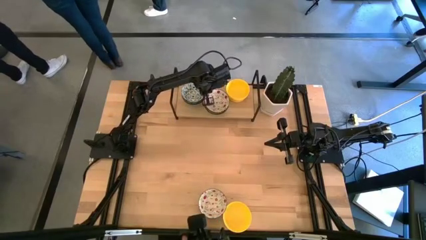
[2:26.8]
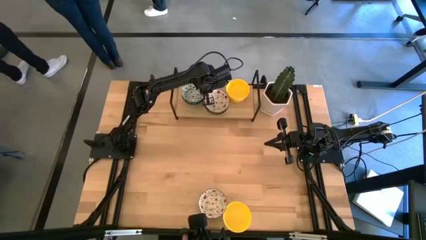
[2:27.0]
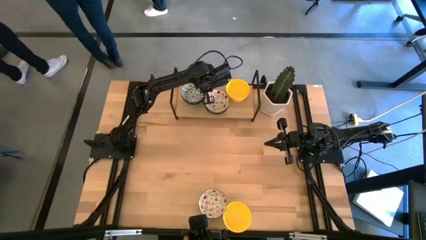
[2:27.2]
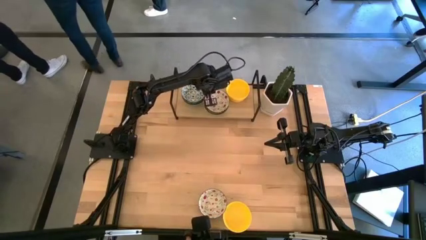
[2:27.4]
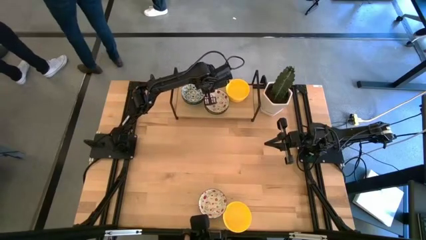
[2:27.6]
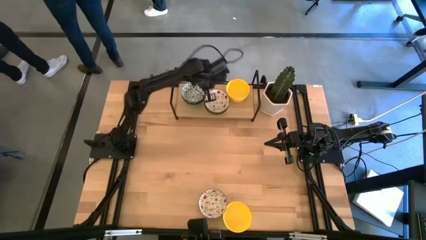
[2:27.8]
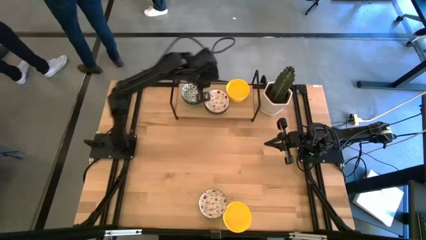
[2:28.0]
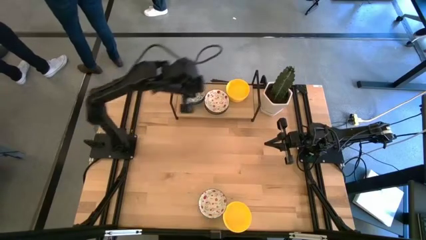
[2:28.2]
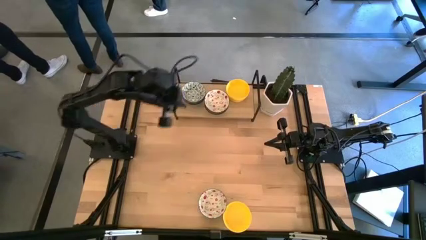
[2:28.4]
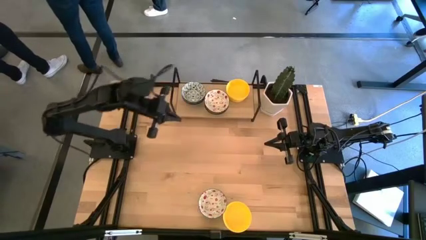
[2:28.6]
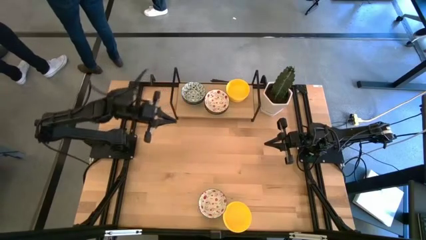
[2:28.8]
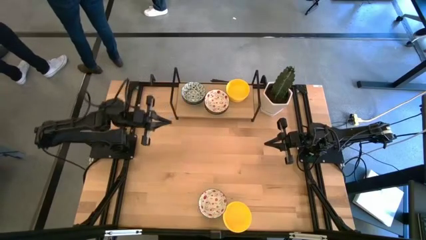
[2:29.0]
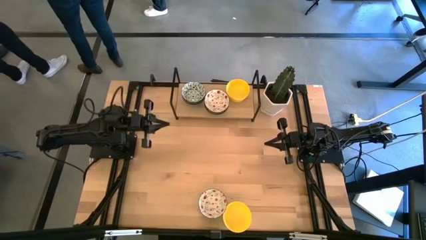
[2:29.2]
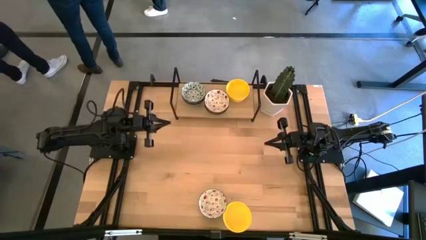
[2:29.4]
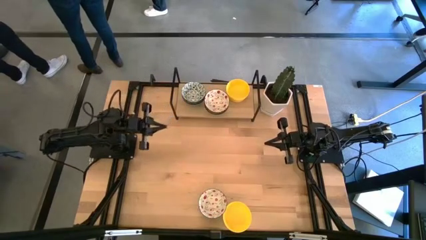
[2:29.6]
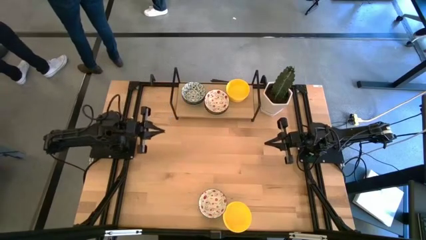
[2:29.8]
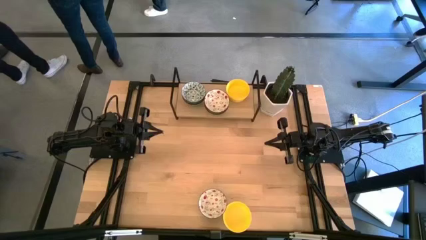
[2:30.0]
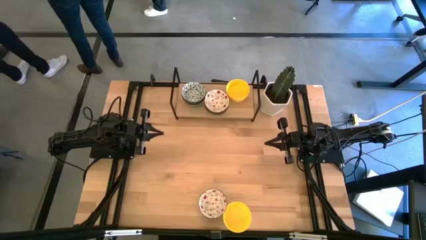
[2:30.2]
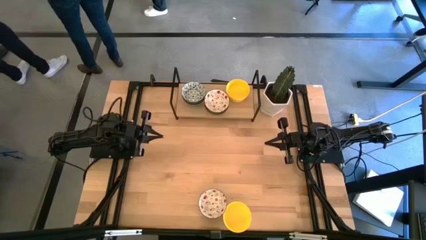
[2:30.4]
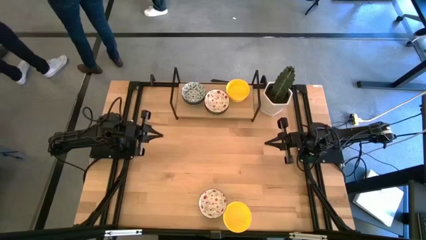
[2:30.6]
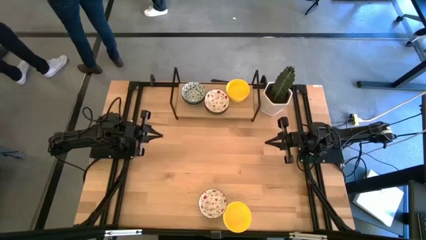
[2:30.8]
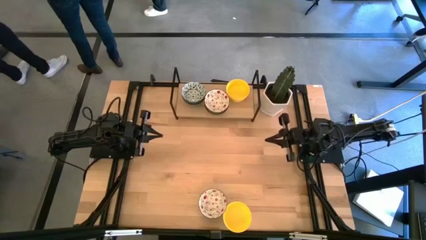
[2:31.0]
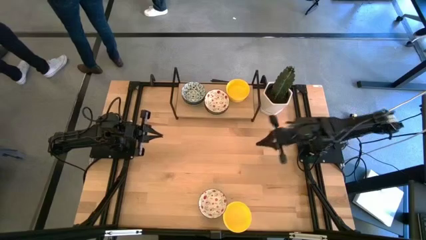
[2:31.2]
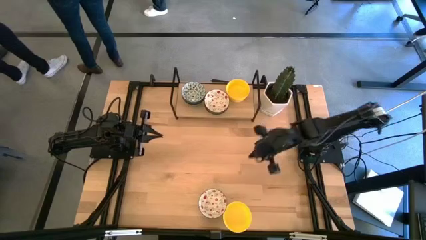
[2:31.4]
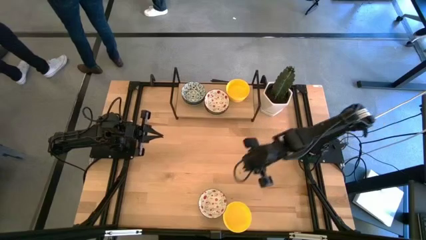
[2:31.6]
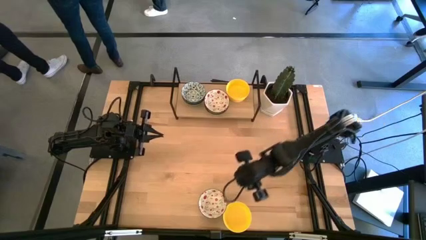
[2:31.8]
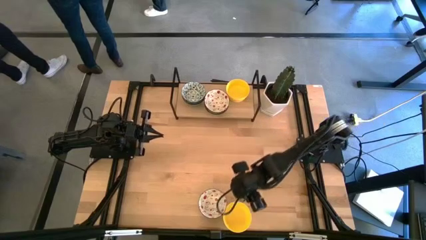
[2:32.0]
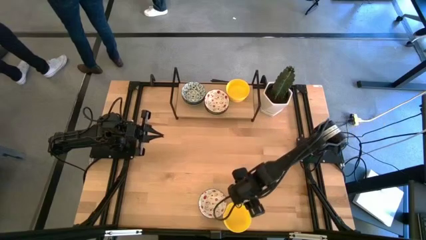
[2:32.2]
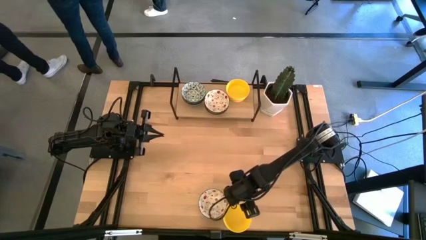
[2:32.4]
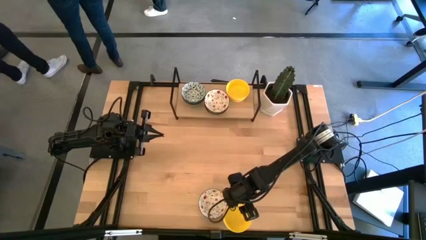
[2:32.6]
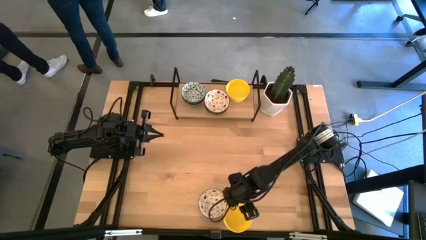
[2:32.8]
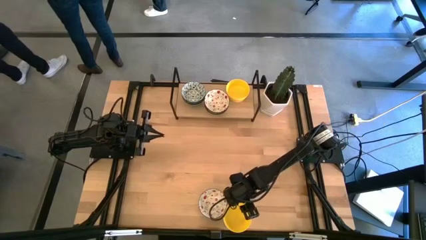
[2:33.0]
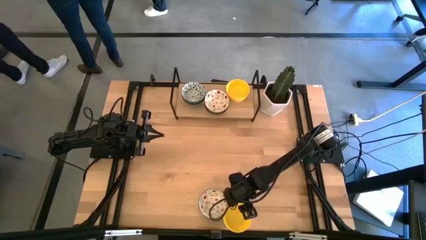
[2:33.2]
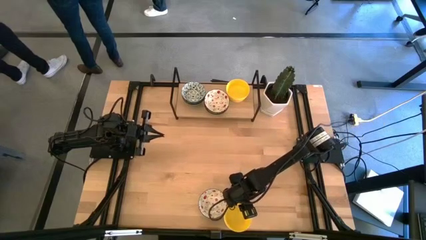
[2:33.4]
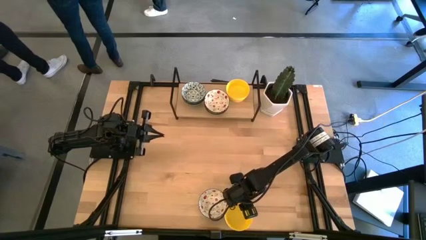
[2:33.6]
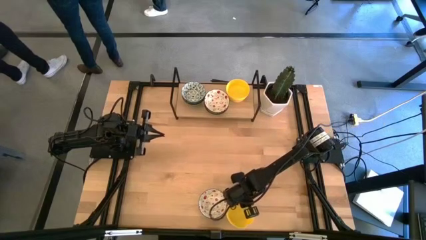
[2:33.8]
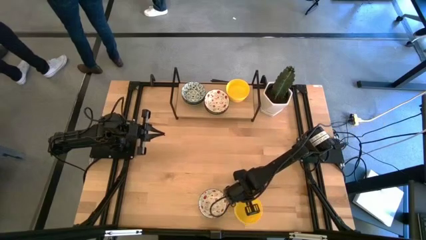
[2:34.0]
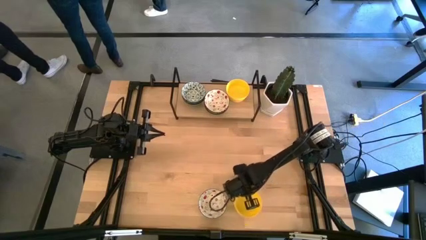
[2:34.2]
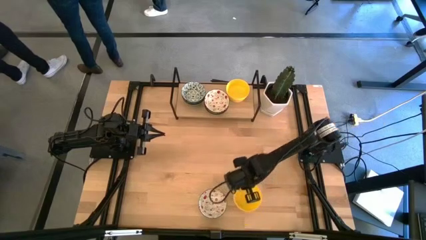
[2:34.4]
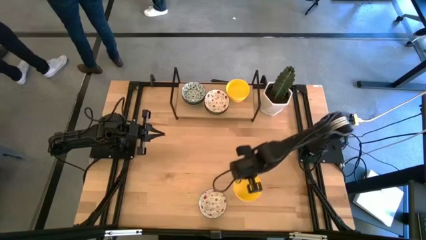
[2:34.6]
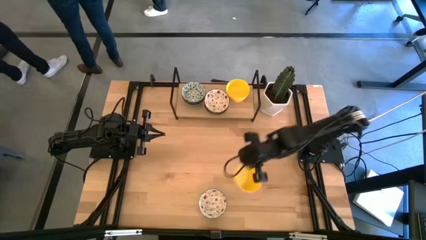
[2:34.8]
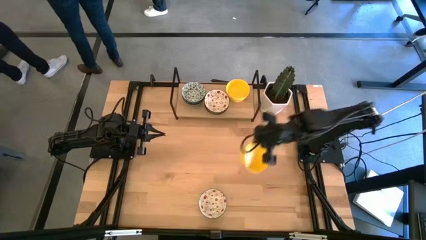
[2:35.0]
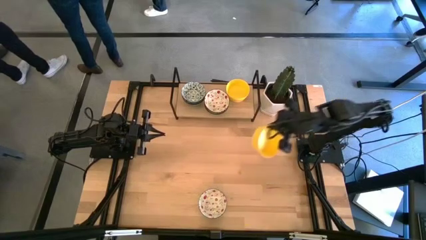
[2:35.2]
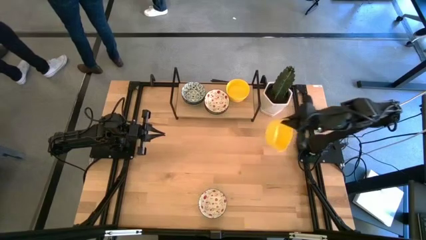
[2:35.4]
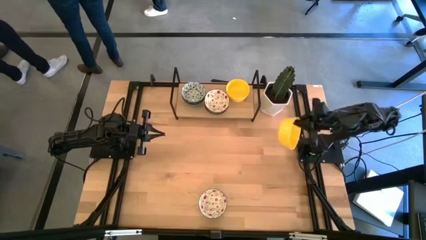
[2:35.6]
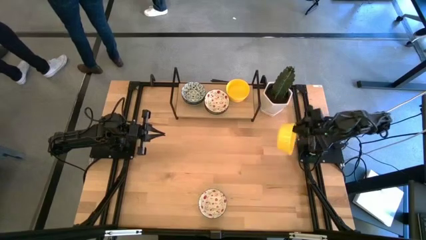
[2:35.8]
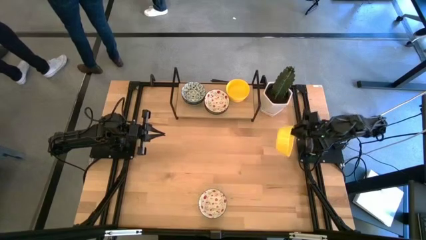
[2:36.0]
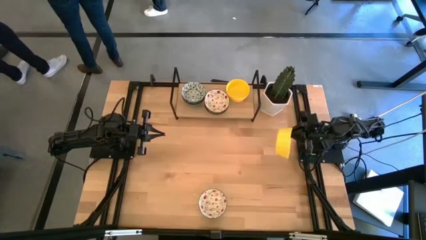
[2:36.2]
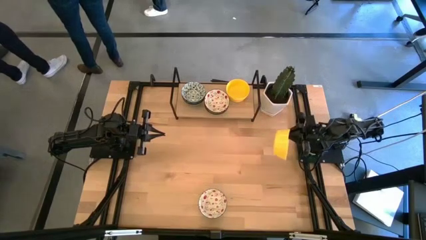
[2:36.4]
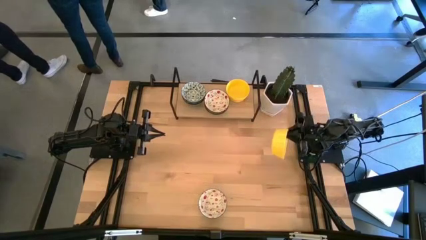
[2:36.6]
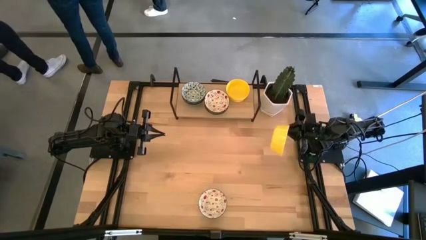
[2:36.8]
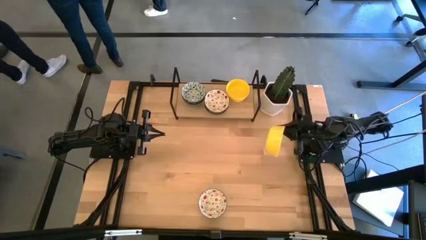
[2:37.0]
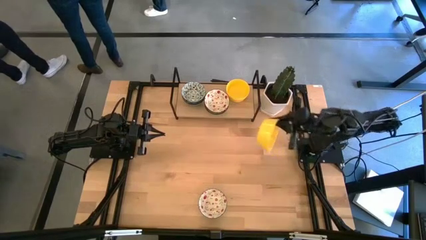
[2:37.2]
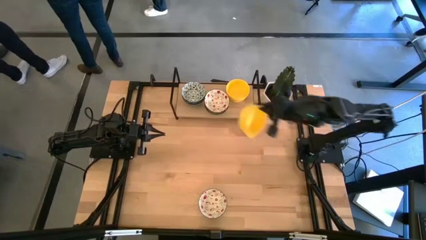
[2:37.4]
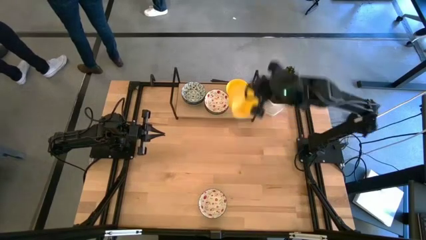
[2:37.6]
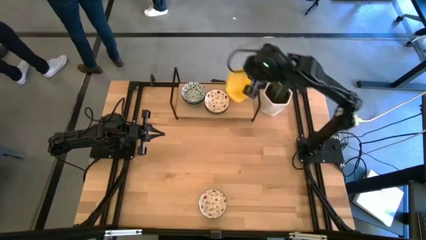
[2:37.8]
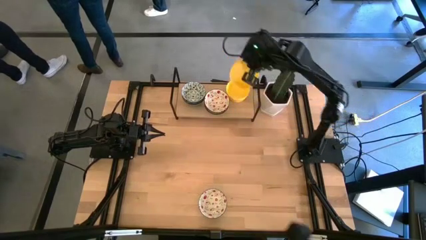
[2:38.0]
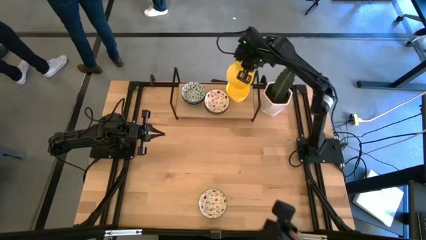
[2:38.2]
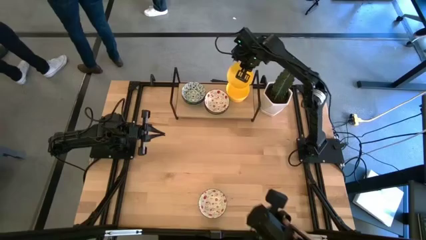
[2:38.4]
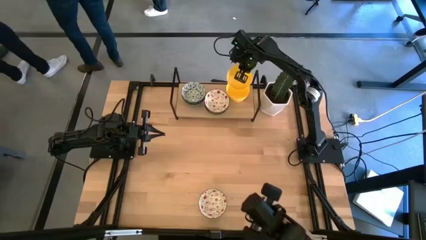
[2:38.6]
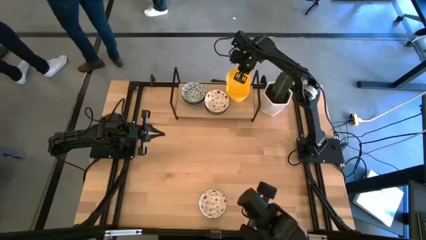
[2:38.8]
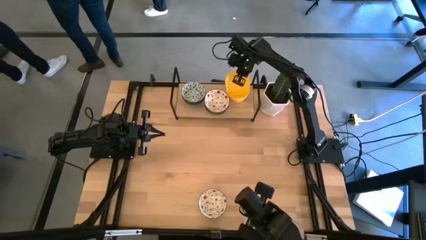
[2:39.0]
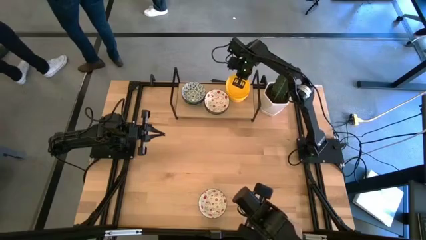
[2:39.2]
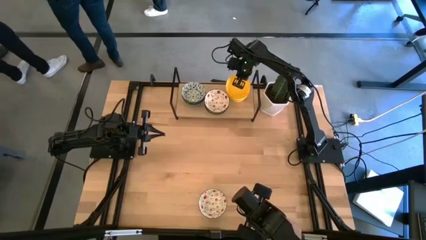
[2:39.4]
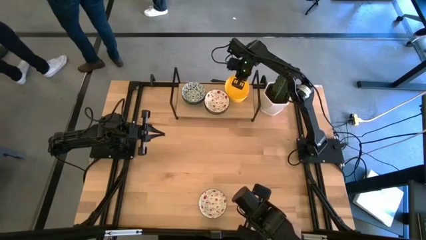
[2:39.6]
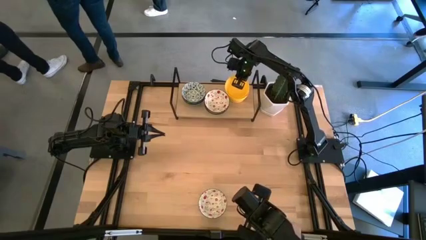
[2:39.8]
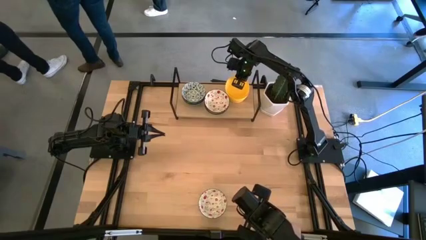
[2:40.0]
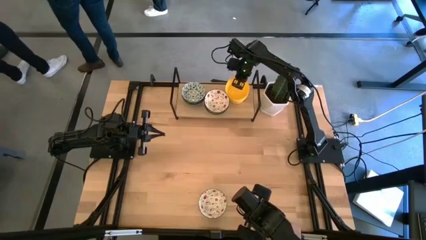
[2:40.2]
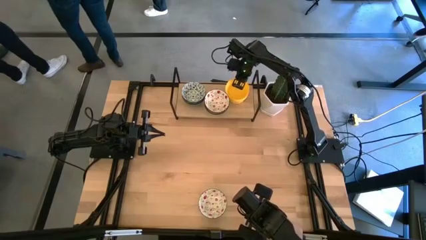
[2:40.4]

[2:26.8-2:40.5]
Task: Pick & Place Mini bowls
Stack the yellow bowl on the yellow bowl on the shelf

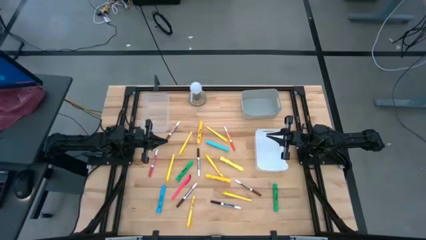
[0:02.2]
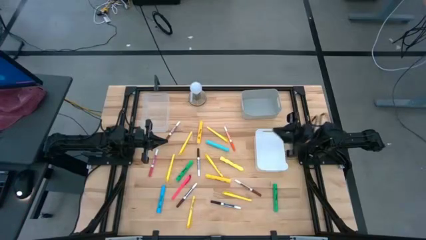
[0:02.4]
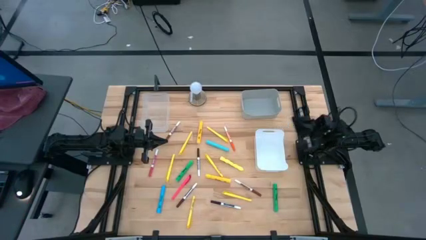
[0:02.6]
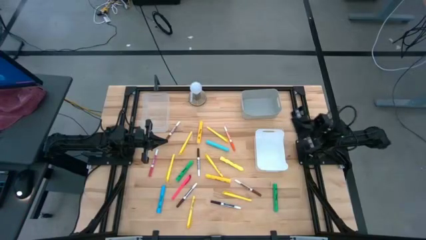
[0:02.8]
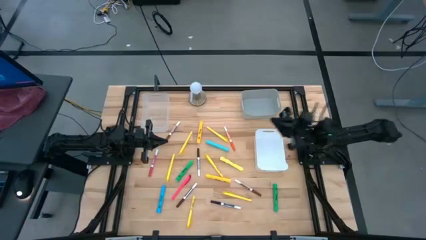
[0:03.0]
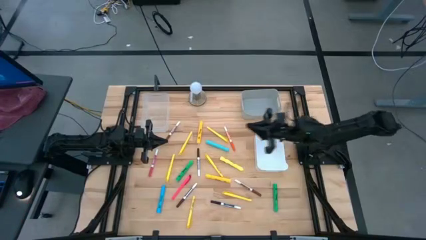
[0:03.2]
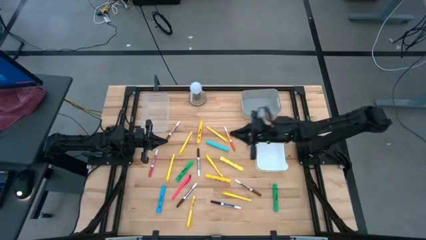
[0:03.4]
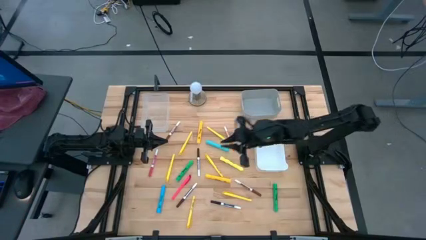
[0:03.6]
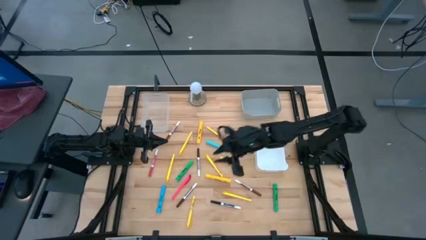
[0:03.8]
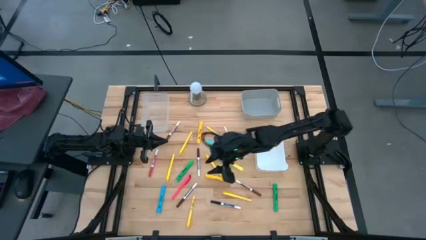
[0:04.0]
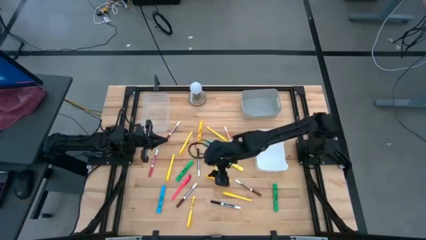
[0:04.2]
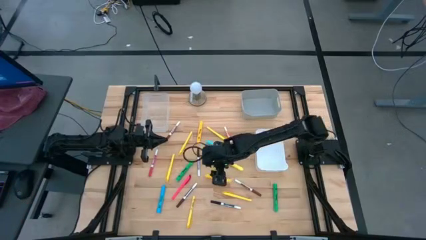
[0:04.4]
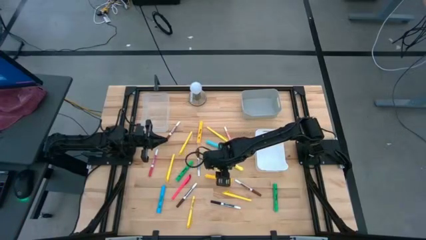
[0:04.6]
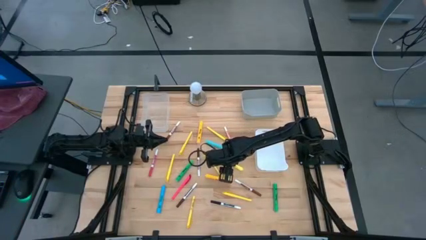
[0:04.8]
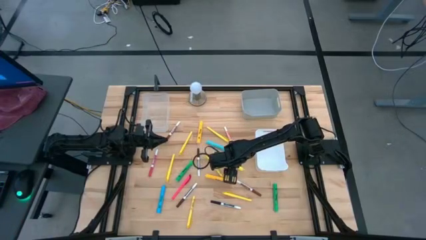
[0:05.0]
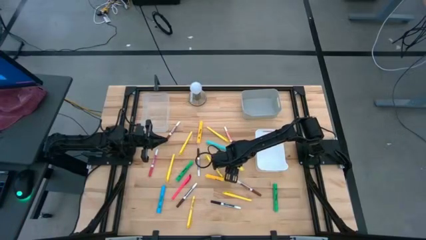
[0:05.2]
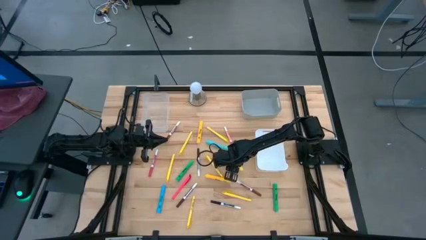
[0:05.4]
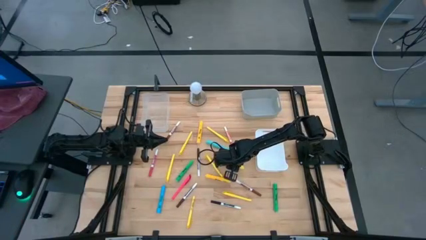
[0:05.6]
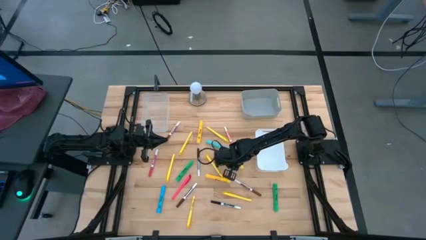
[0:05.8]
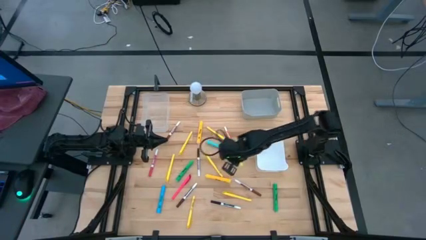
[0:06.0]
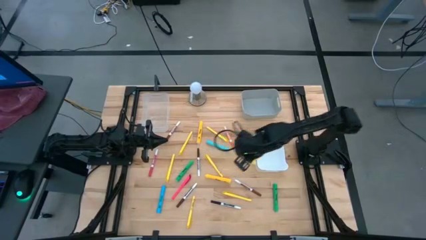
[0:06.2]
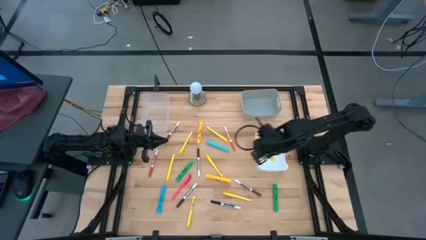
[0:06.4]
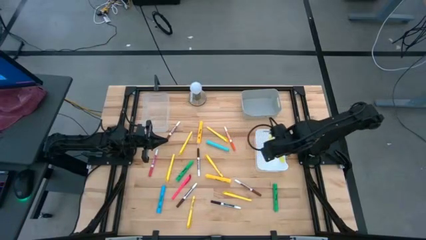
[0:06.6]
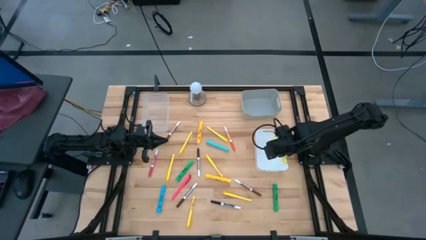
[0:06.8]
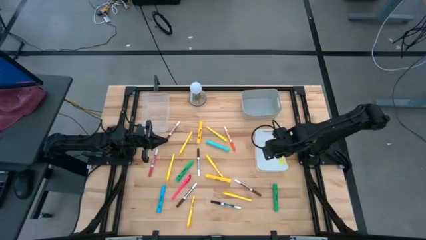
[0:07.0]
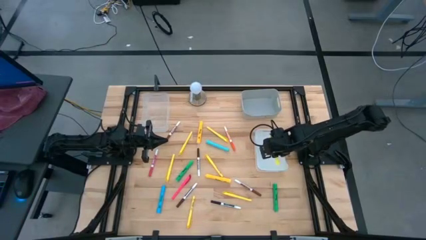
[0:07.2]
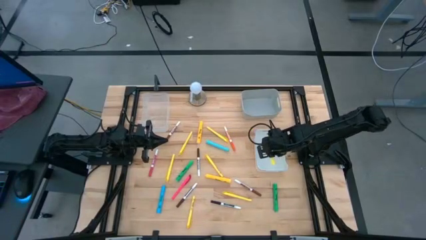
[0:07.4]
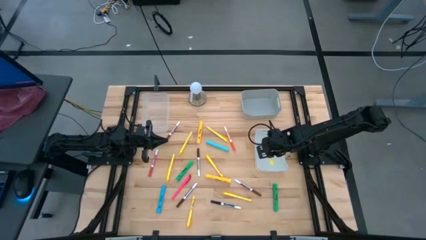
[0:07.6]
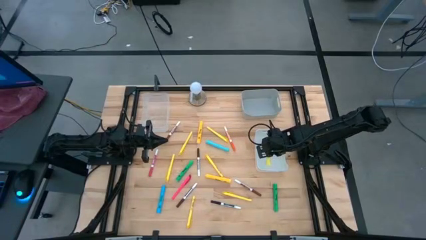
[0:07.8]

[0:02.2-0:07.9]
Task: Pick & Place Markers
Put the yellow highlighter pen into the white bin
